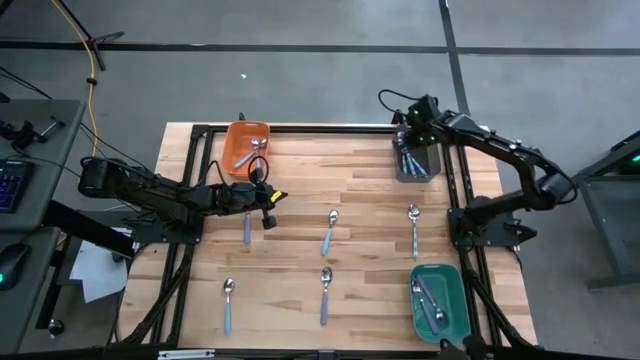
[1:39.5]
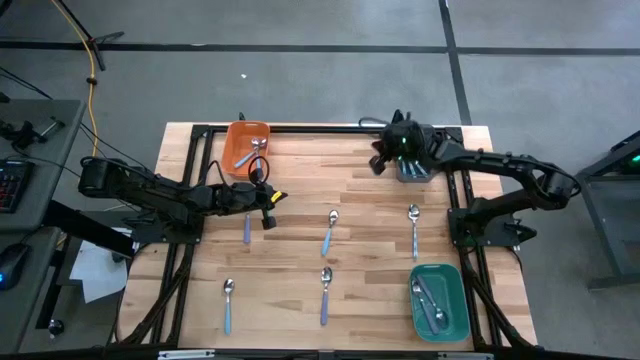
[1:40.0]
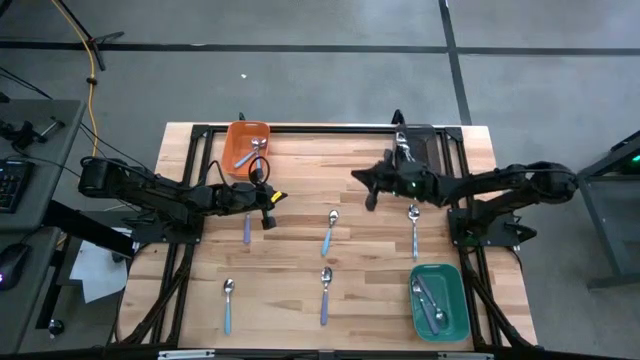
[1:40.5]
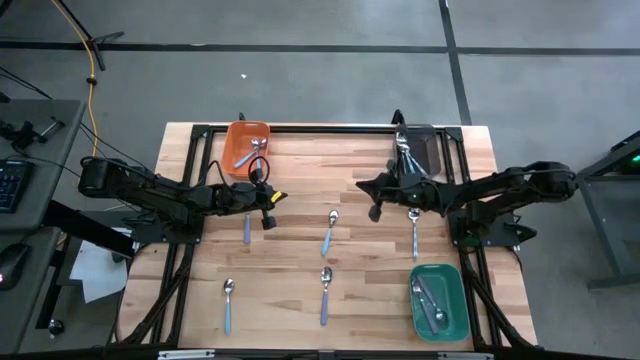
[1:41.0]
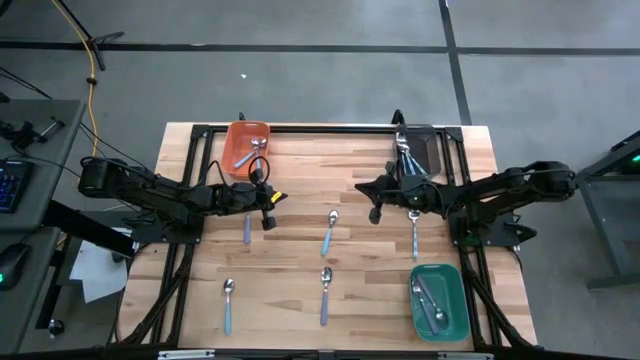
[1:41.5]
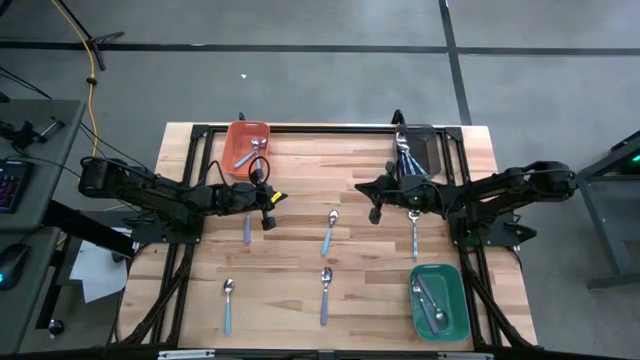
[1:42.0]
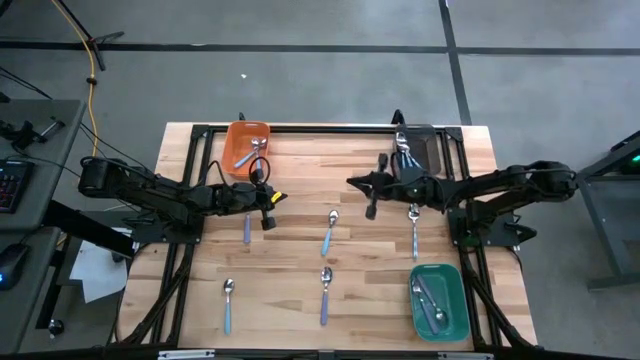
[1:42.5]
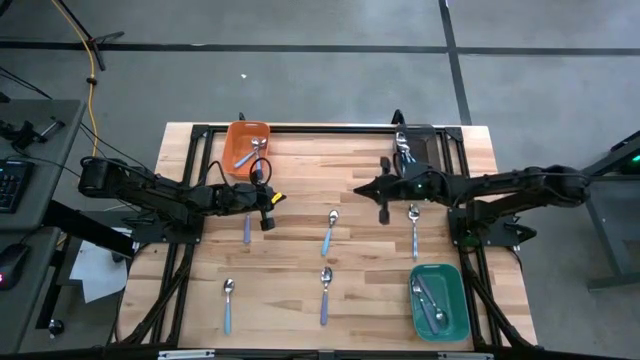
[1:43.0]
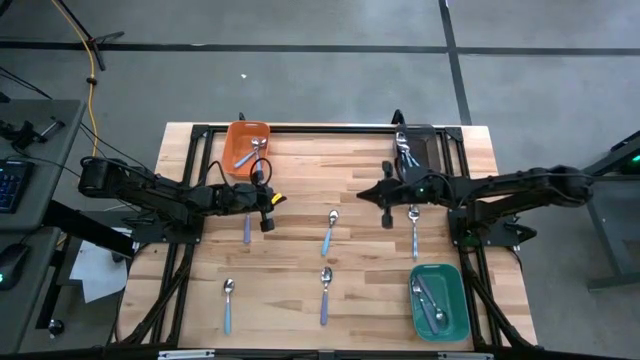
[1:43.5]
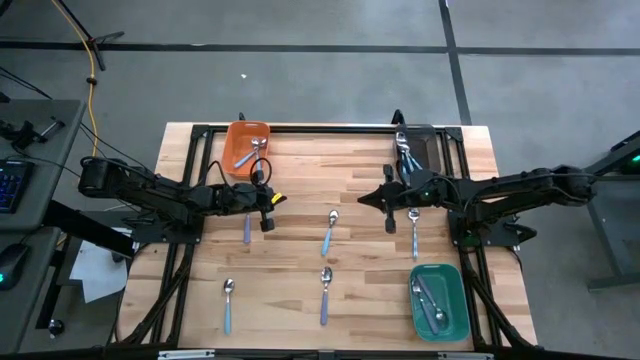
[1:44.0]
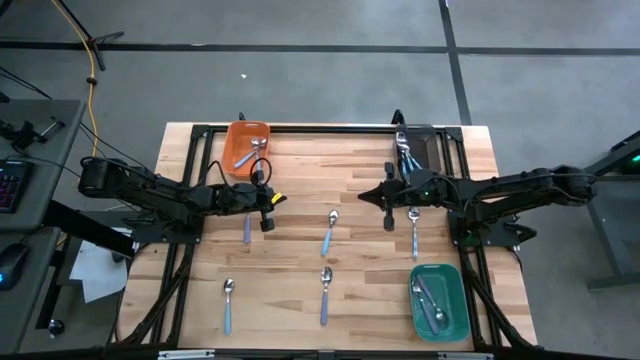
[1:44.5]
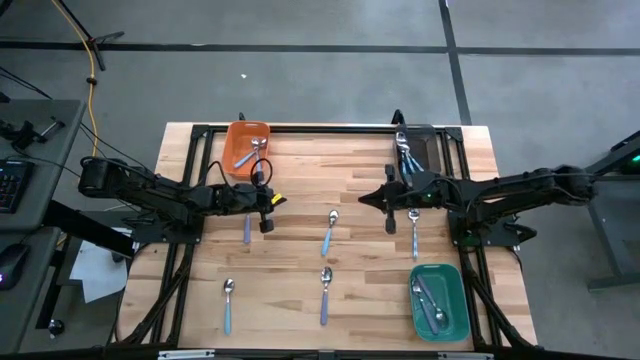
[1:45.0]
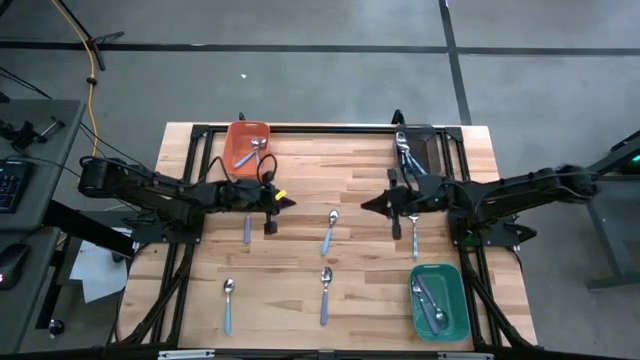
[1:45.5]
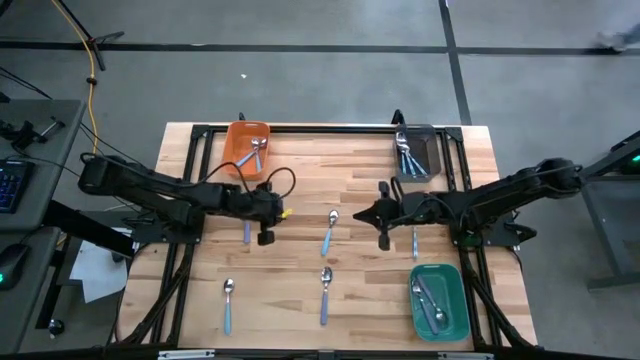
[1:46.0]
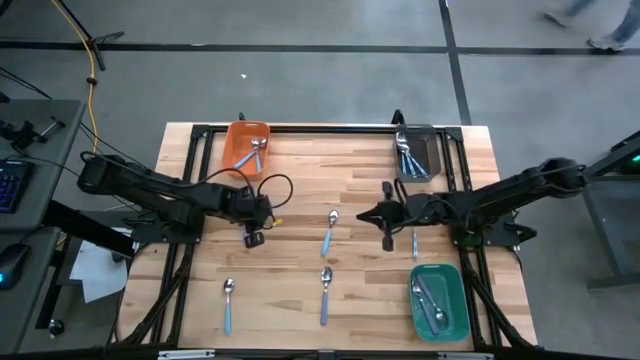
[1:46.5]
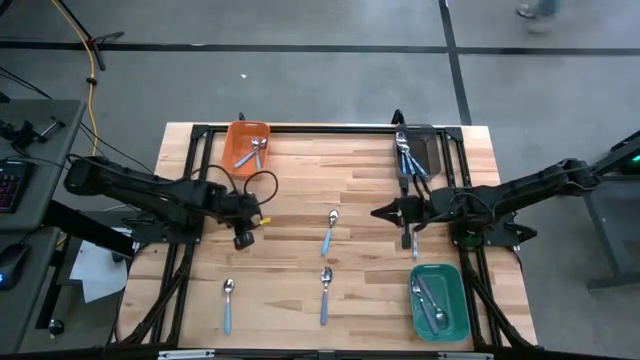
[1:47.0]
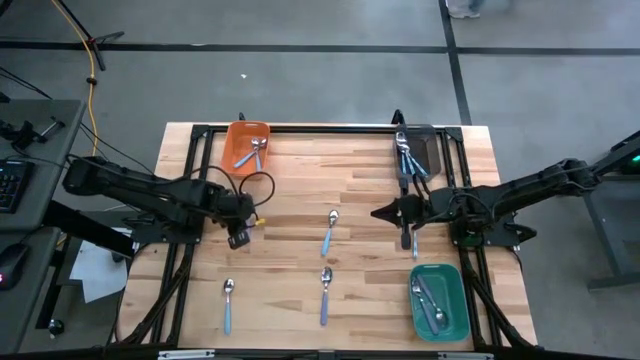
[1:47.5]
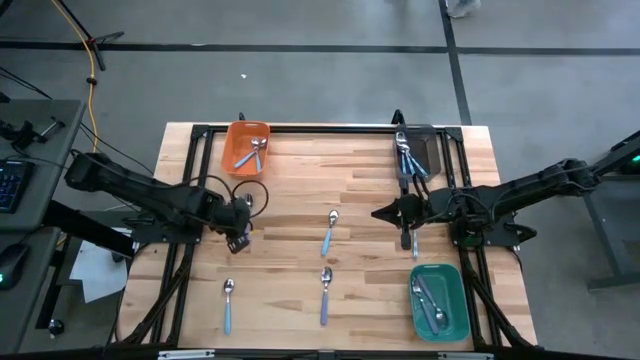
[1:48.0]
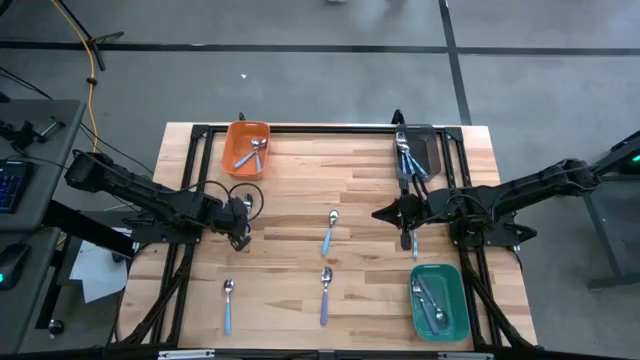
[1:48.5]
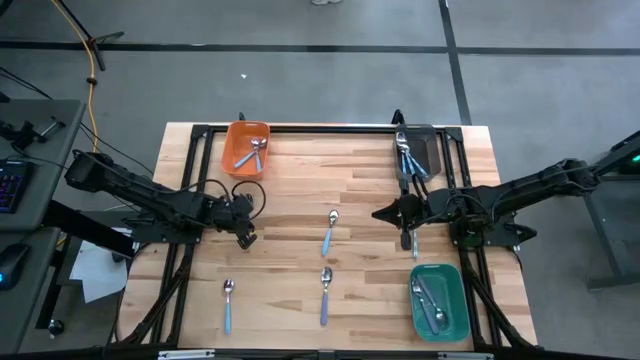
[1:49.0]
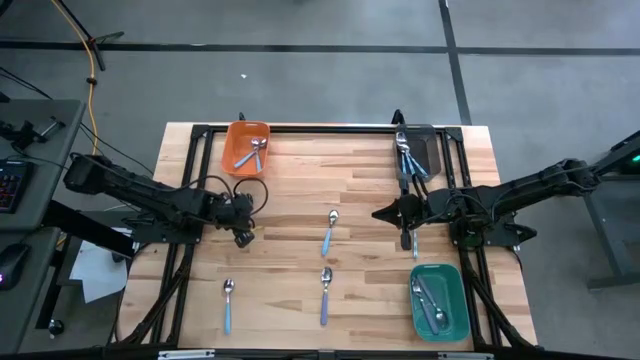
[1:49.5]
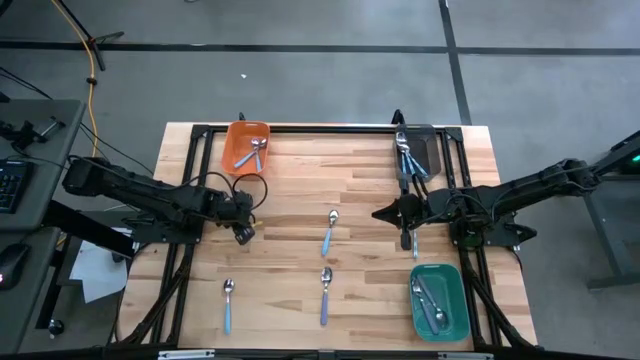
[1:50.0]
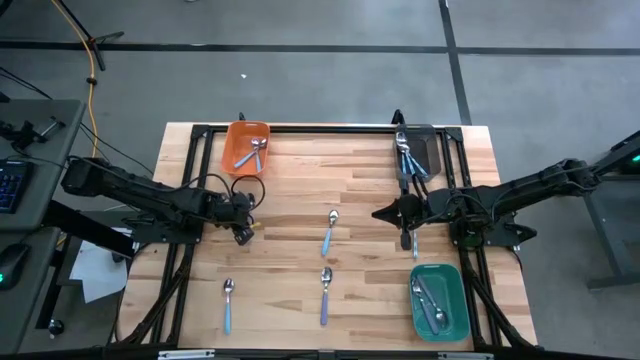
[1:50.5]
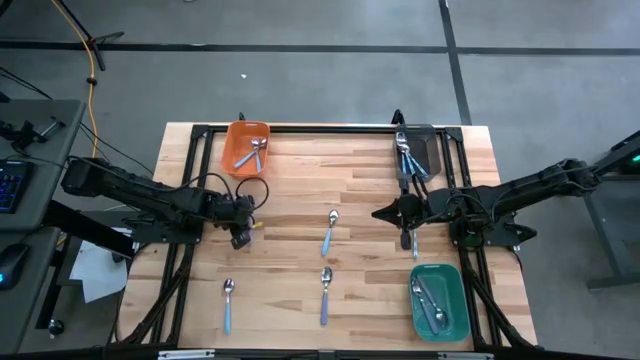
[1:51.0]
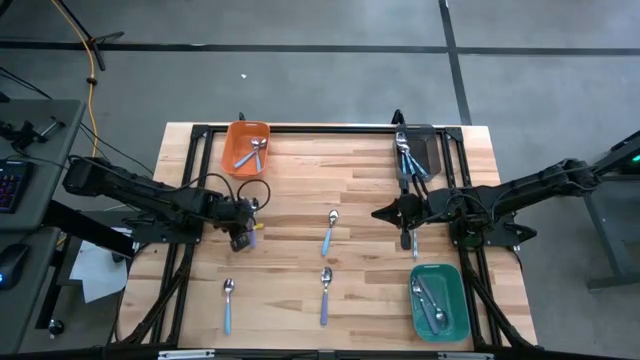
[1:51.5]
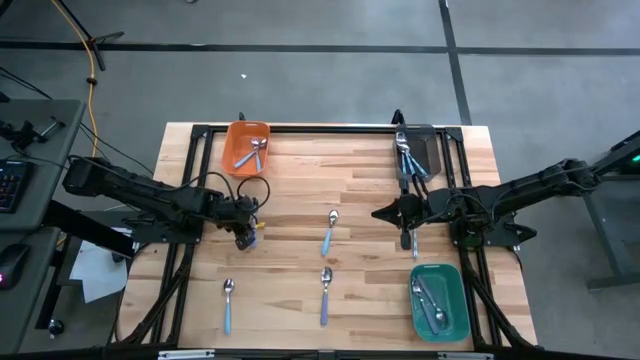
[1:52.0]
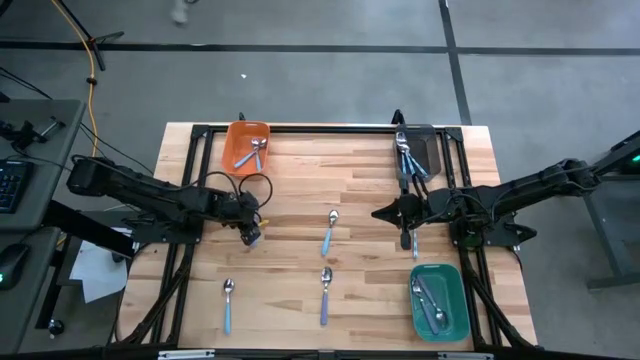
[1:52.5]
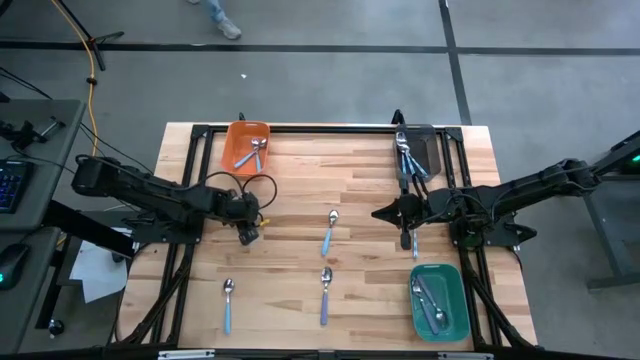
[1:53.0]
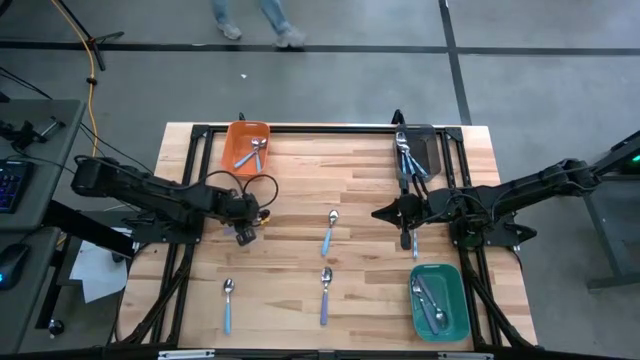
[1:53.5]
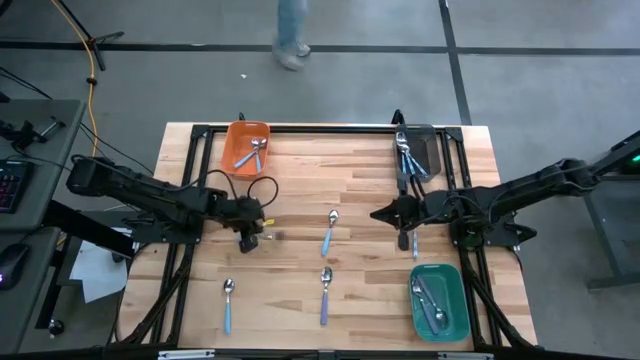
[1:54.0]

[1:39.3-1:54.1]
Task: Sort silverware by color (type)
Put the purple spoon into the green bin

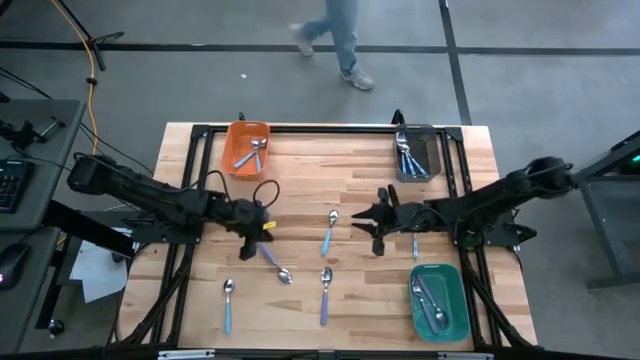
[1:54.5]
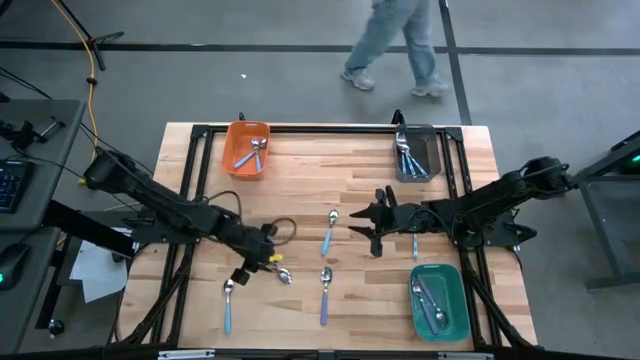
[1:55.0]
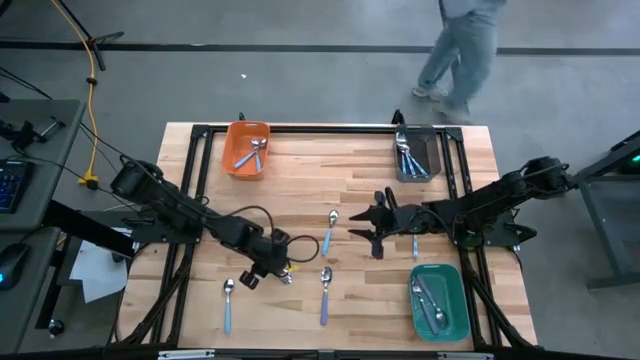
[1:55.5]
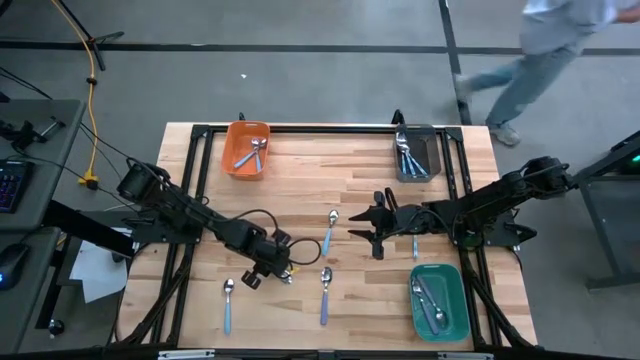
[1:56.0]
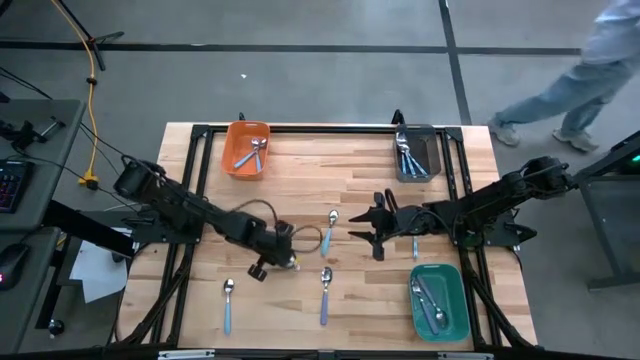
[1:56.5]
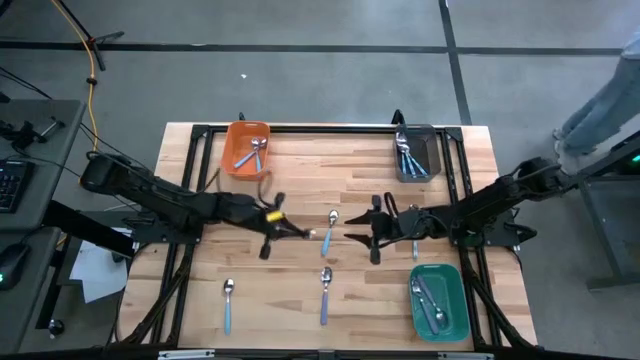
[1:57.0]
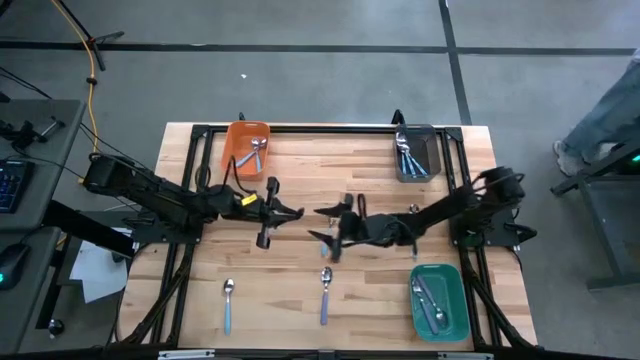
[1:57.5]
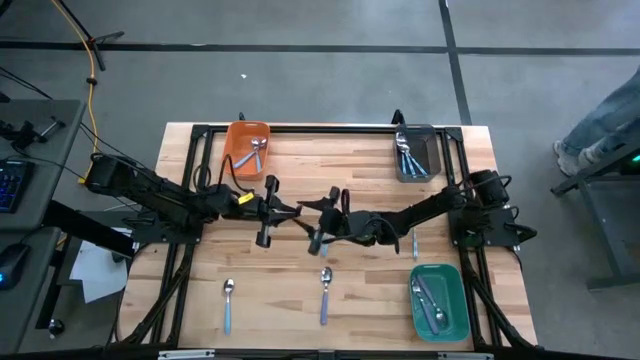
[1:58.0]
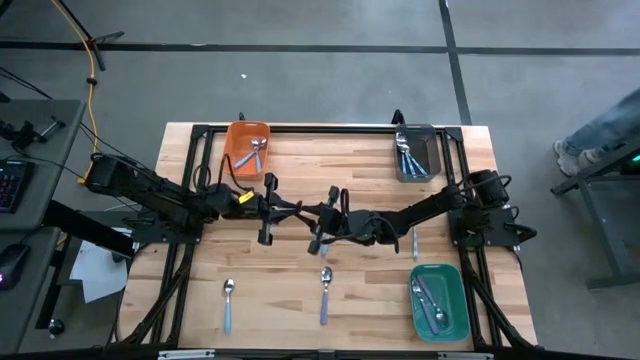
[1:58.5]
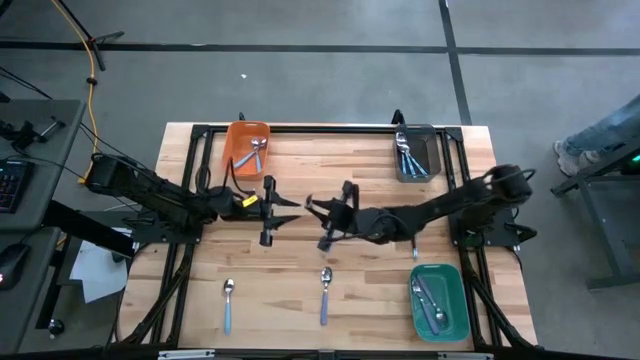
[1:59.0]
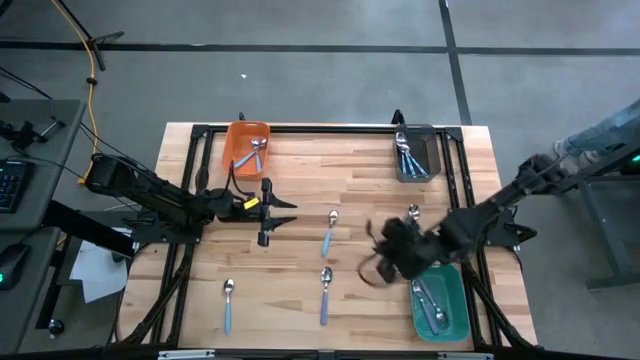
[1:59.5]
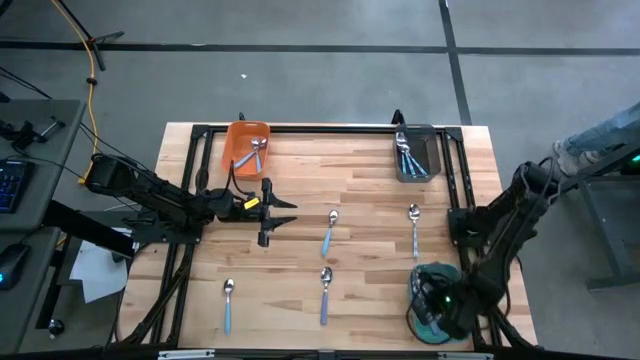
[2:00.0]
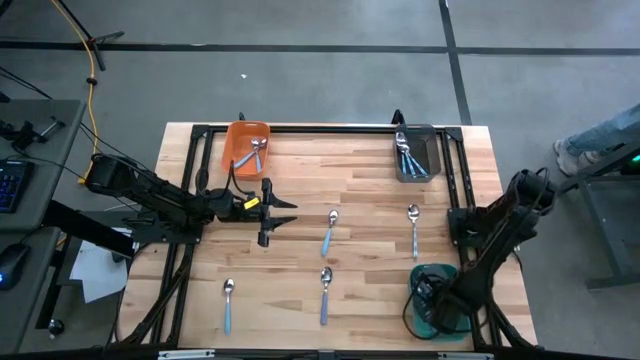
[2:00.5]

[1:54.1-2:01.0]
Put the purple spoon into the green bin

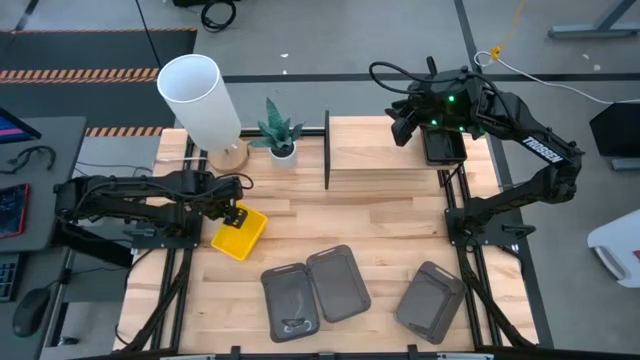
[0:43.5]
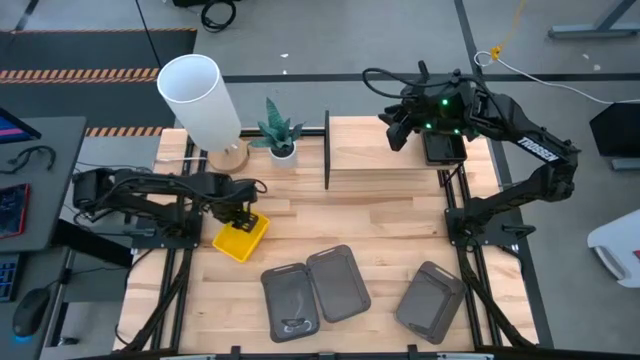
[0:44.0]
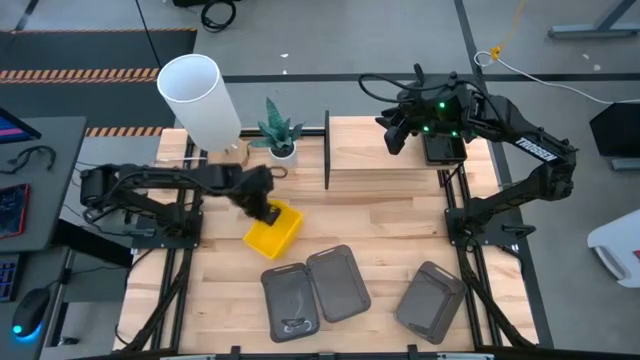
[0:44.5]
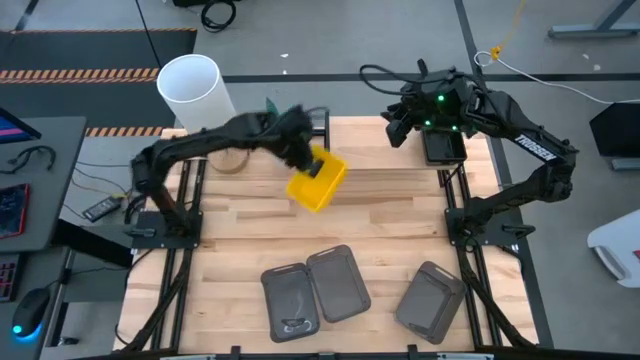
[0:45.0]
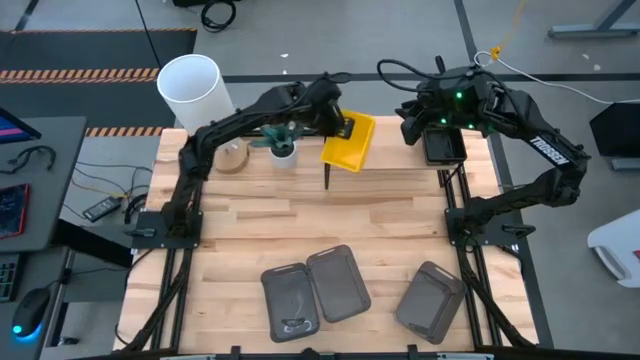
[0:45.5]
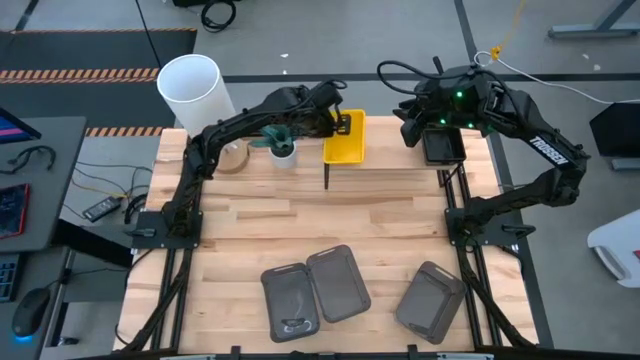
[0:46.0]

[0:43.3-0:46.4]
Task: Stack baskets on shelf by color
Put the stacked yellow bins on the shelf
